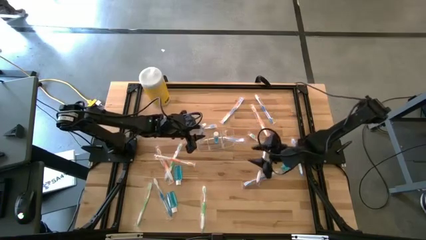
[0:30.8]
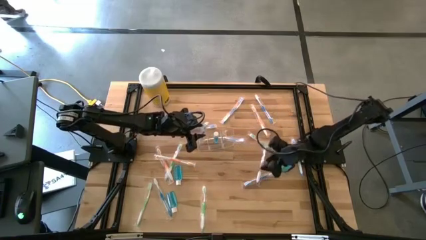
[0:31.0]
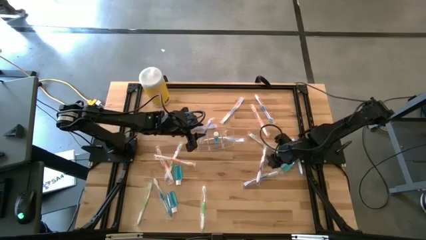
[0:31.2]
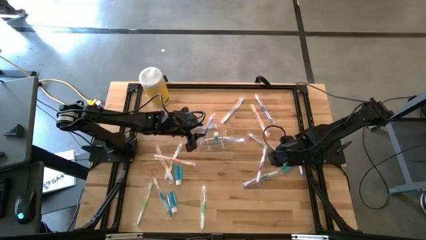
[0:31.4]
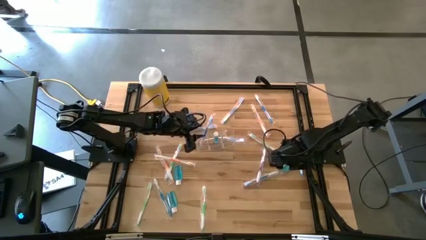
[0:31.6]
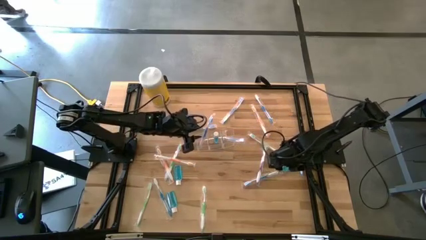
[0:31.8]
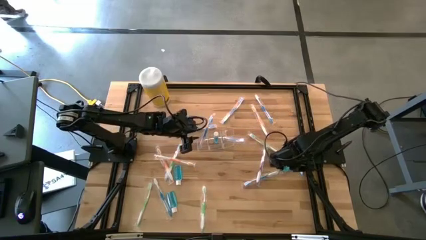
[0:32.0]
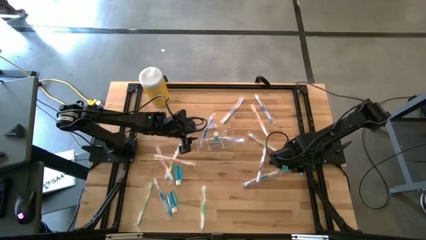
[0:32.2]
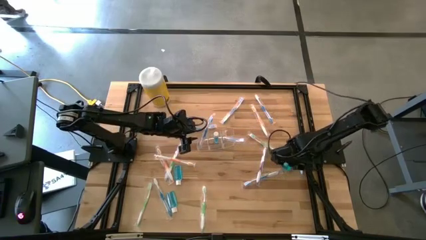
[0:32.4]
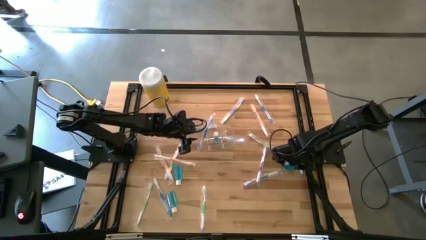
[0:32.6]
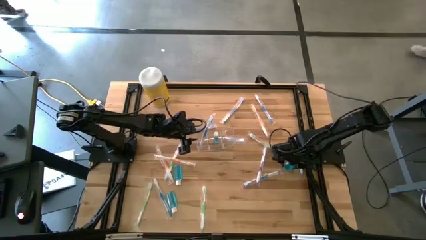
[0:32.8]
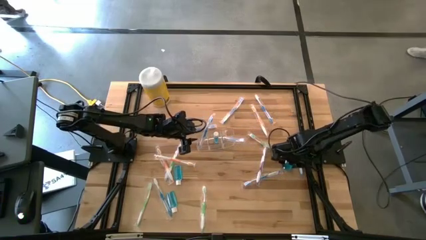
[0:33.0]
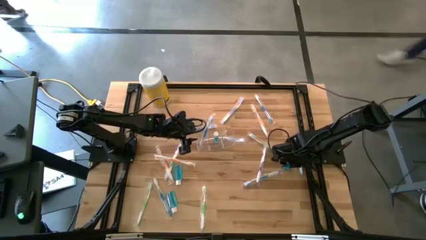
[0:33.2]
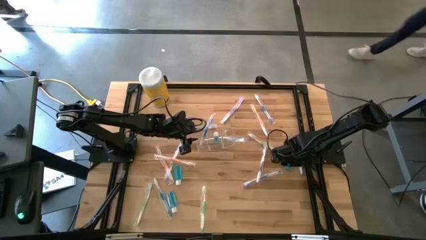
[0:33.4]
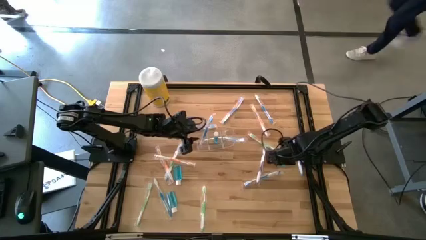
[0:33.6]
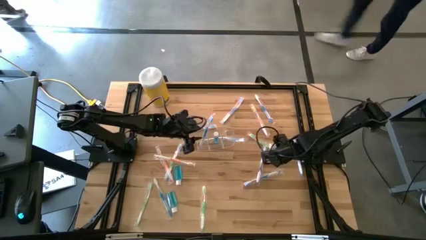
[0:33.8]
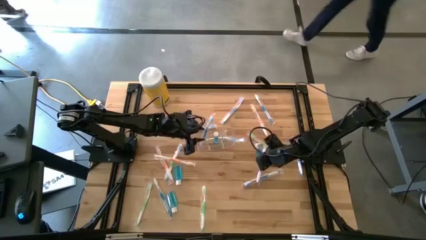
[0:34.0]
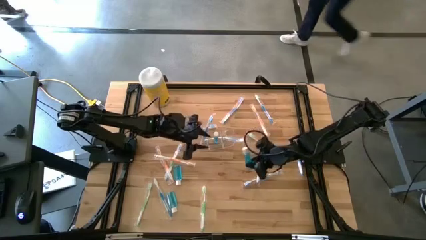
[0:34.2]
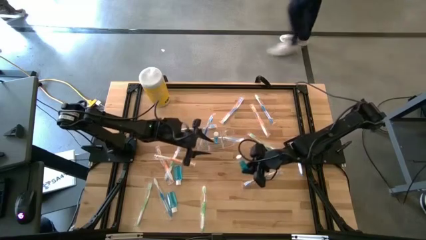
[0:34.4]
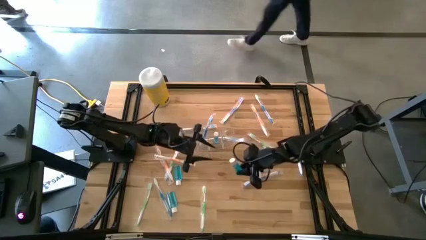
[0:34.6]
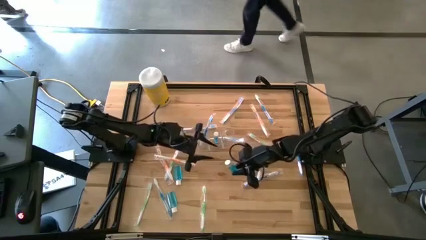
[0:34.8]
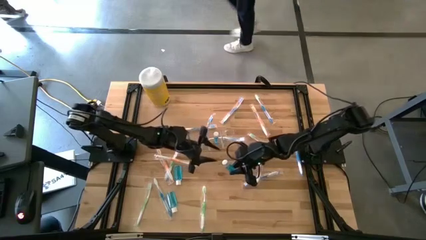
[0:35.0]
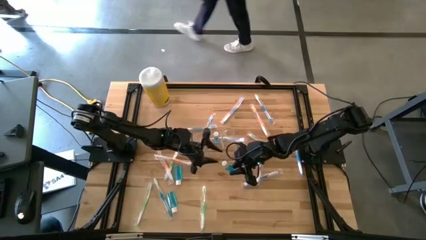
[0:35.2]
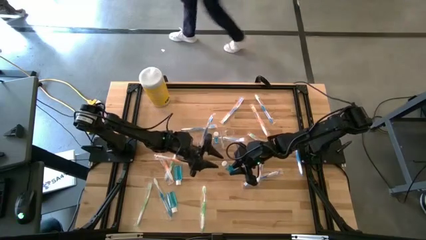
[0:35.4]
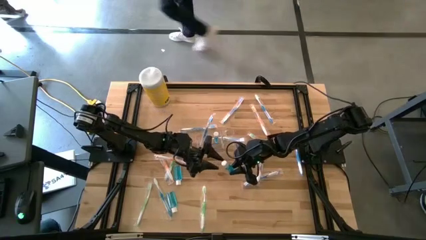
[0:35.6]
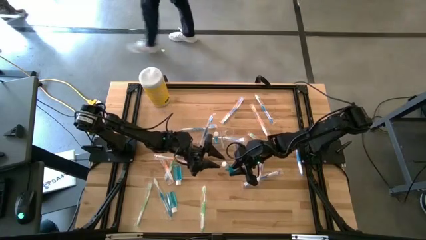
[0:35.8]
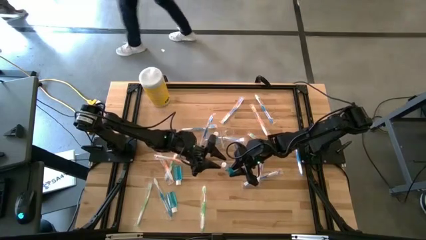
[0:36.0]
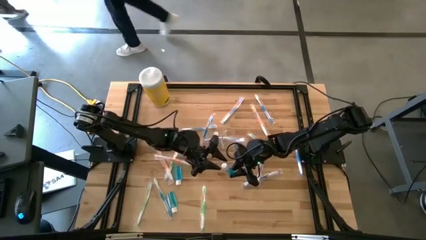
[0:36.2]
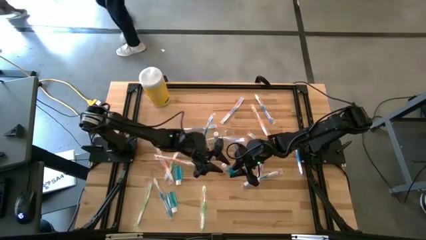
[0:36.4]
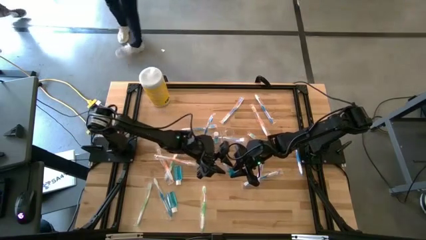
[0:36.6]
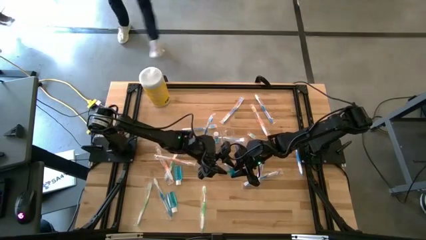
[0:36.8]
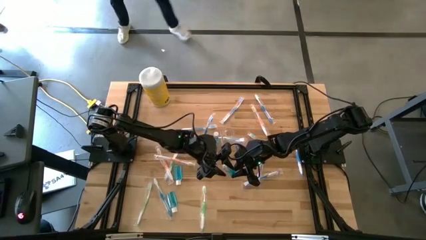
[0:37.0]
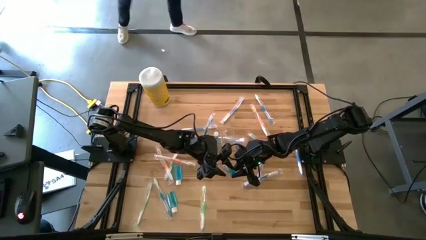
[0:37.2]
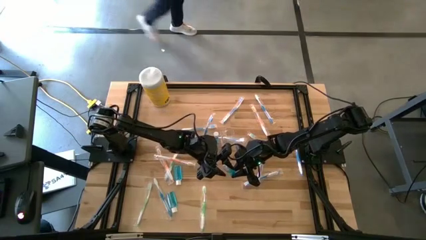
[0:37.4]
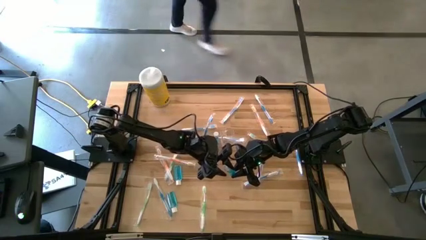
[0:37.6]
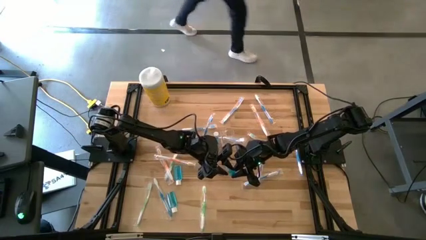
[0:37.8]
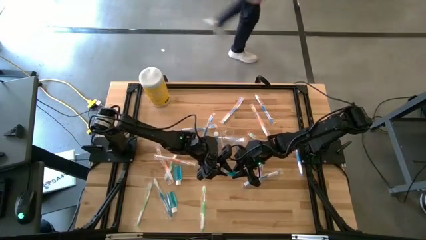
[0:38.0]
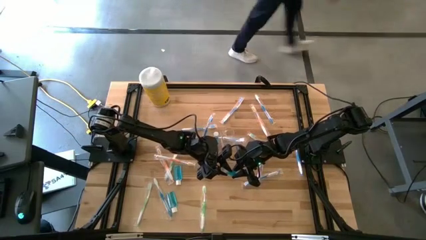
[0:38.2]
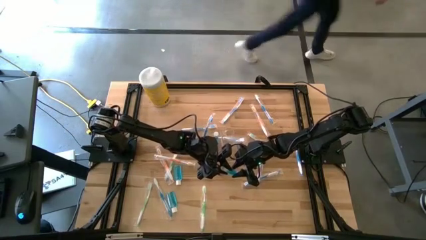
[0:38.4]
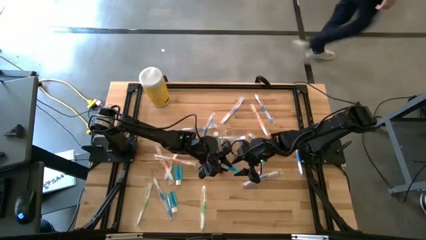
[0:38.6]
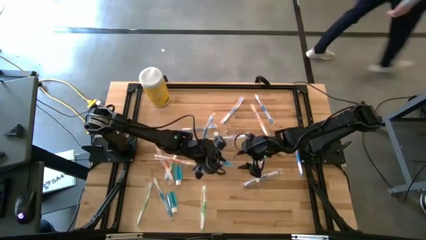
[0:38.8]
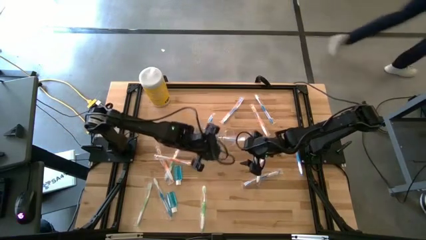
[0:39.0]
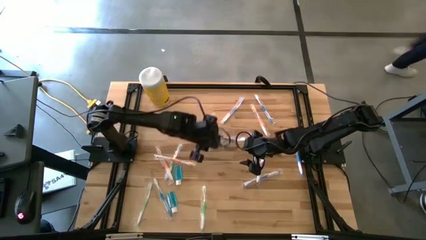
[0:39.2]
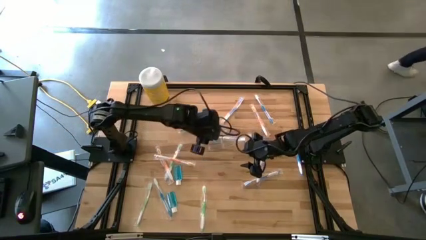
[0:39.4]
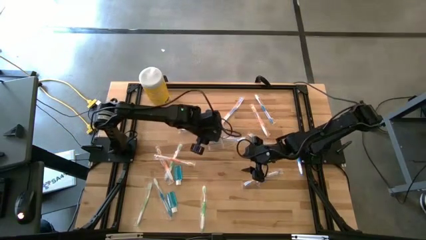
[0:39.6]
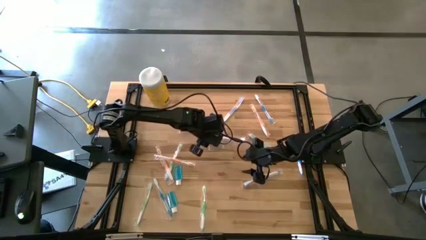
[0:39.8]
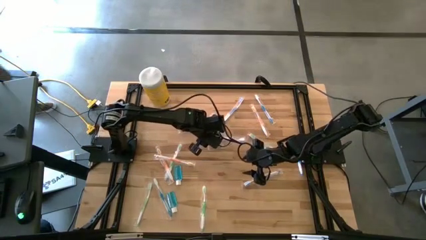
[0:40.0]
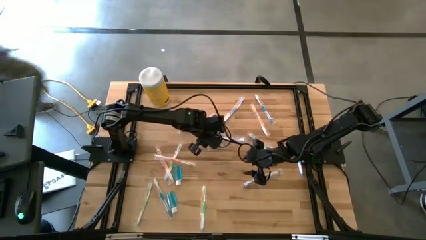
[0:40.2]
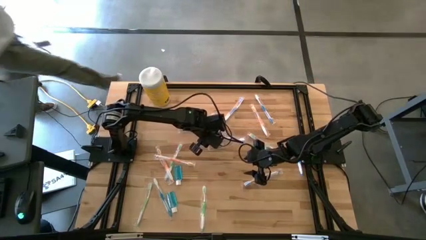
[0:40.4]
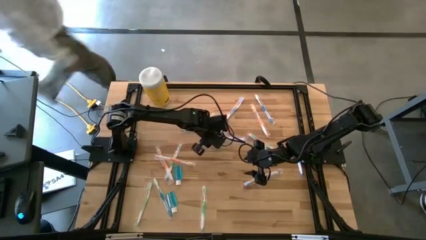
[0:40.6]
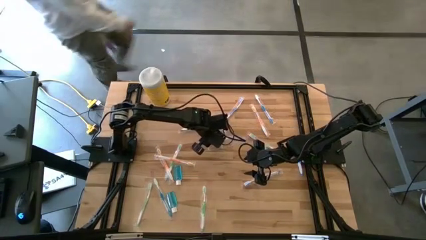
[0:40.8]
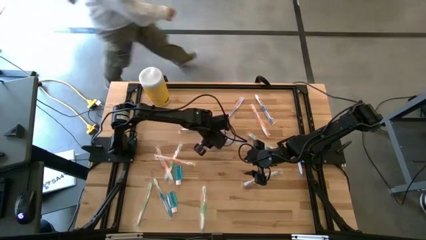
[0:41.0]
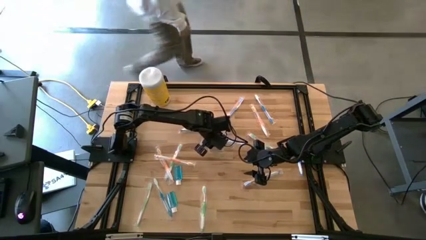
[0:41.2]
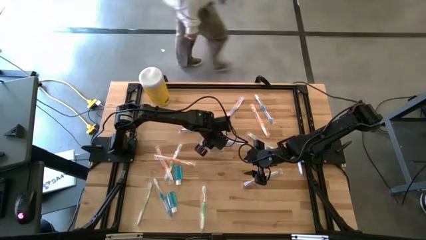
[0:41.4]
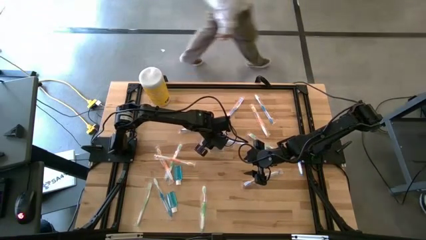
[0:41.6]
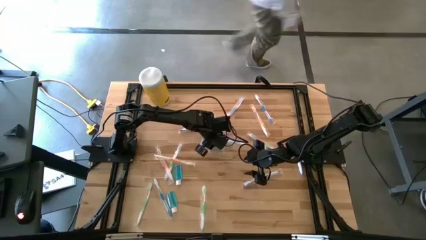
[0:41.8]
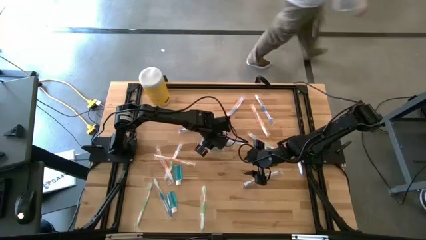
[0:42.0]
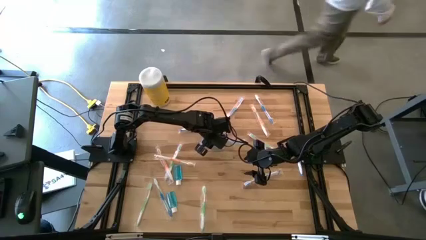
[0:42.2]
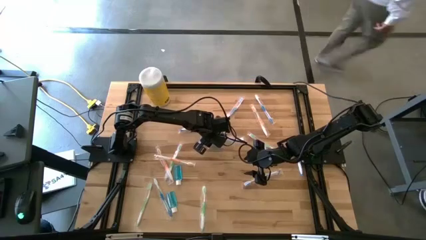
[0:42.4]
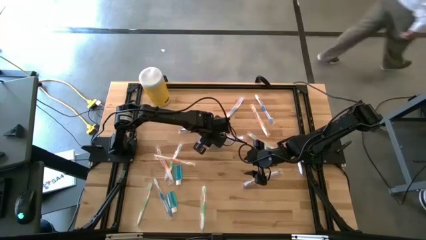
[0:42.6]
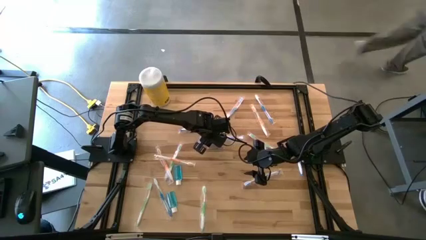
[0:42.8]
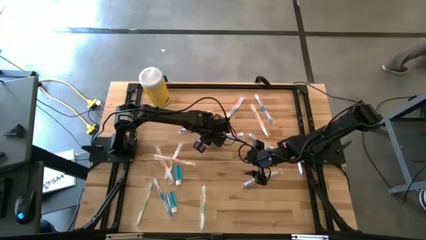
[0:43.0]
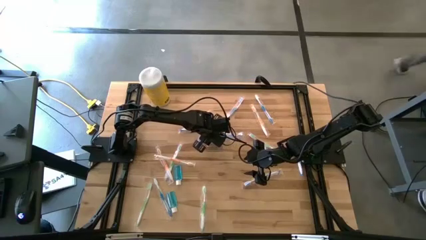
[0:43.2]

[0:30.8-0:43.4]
Task: Pick & Place toothbrushing station
Put the blue mouthwash into the transparent organizer

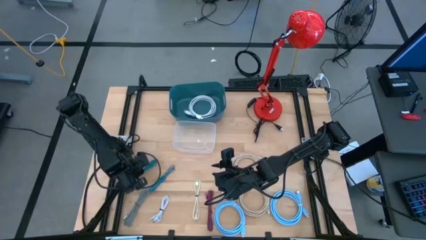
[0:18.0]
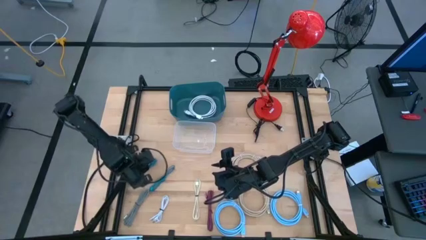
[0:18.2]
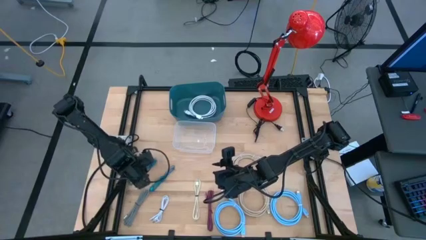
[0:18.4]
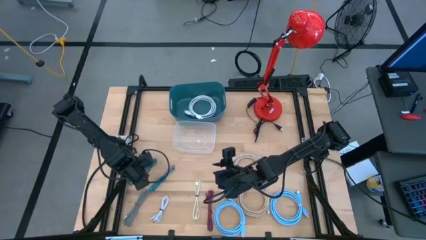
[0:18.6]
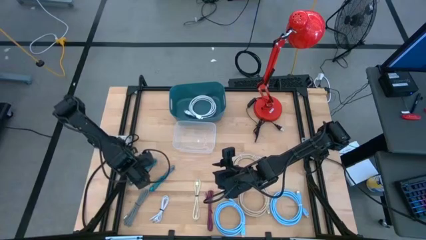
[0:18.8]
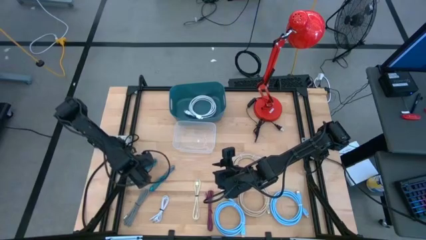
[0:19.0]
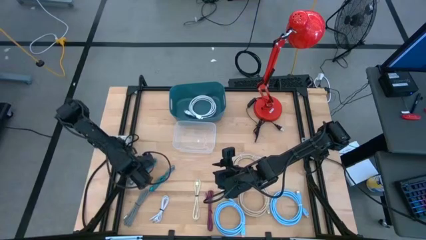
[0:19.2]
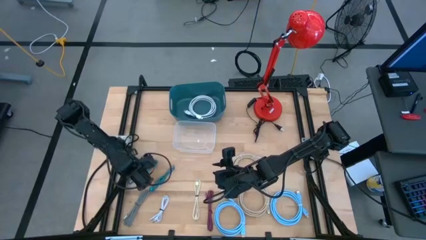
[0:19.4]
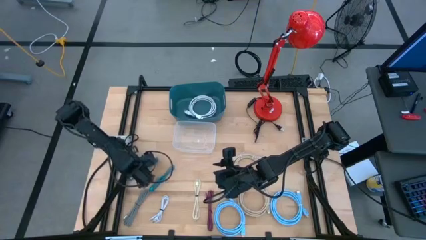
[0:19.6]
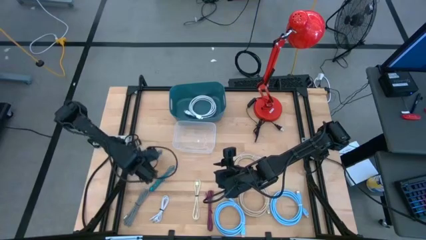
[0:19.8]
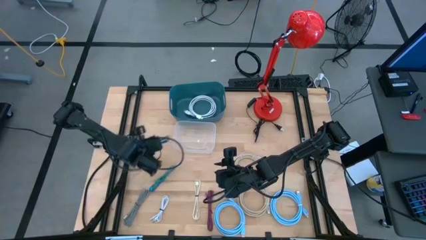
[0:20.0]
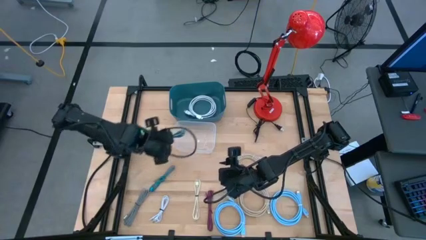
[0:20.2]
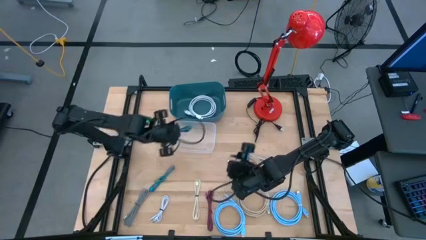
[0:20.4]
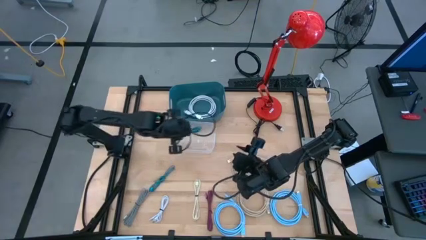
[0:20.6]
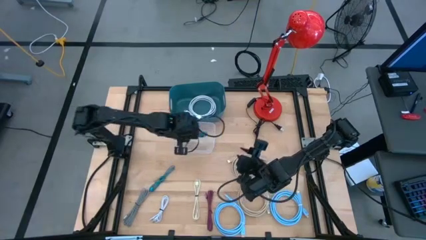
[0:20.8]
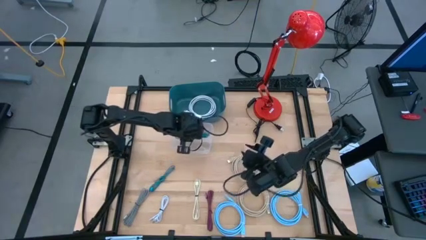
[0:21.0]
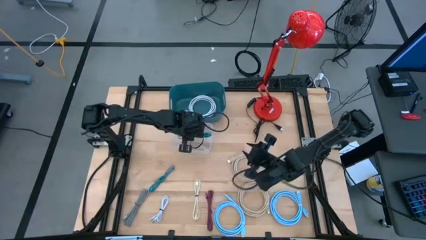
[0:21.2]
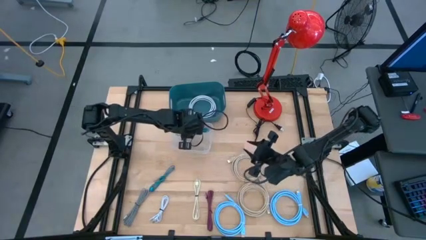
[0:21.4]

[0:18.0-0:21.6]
Task: Pick & Place USB Port
Put the left blue charger cable into the transparent bin

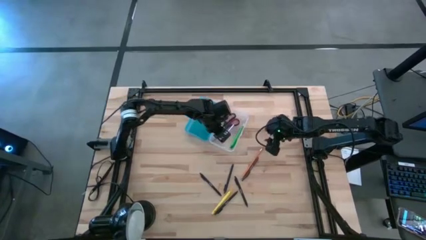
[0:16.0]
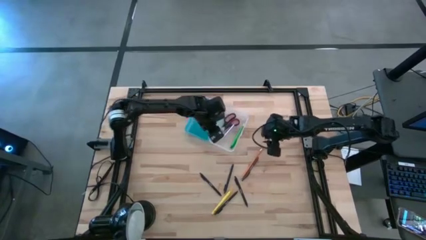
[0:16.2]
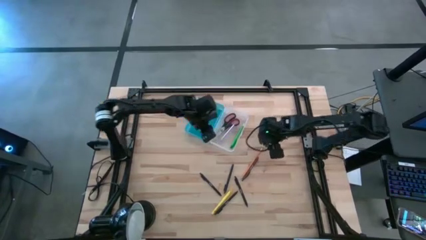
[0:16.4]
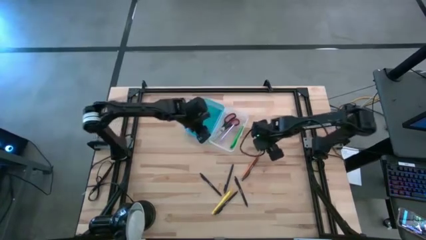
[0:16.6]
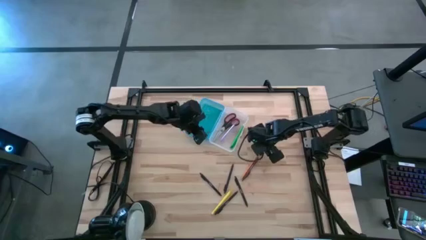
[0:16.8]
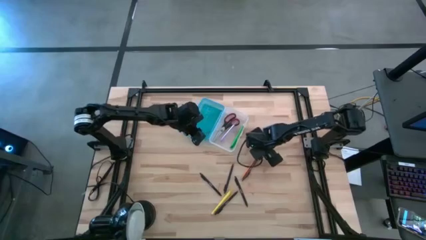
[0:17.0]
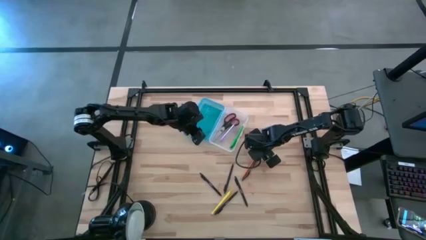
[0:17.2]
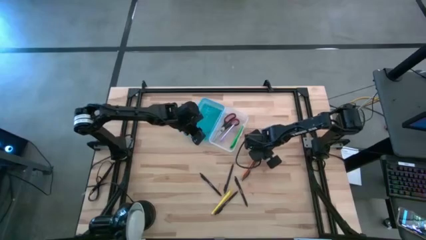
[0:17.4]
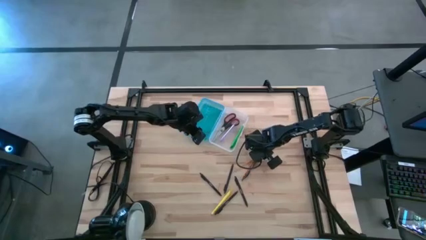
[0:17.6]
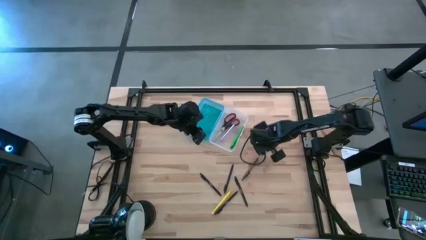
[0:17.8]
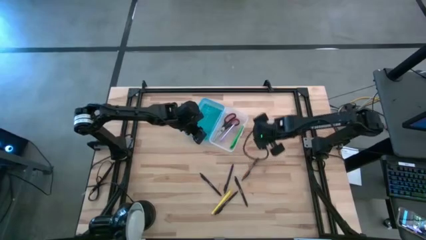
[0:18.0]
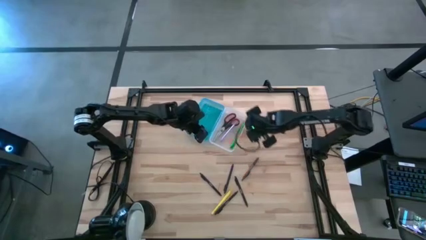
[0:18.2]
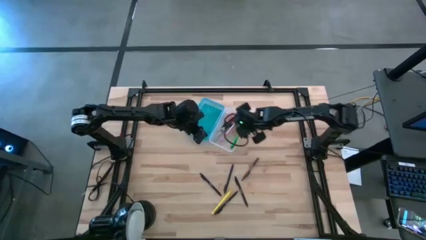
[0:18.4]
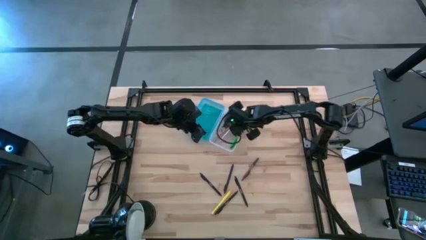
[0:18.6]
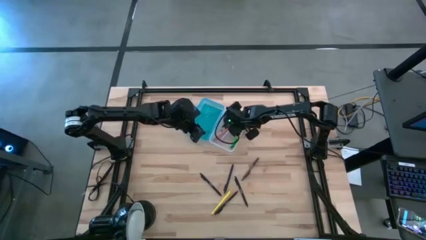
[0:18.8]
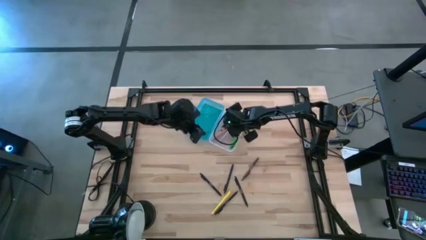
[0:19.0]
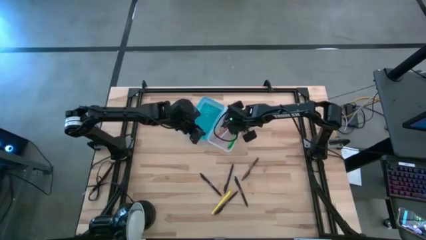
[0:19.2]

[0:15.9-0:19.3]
Task: Pick & place school supplies into a supply box
Put the orange pencil into the blue supply box
